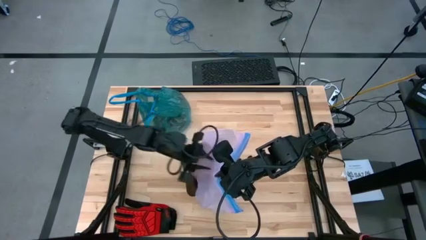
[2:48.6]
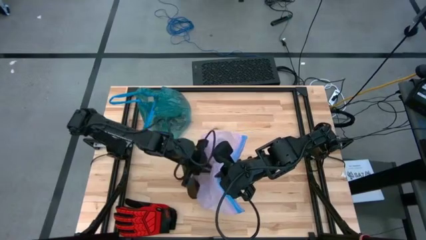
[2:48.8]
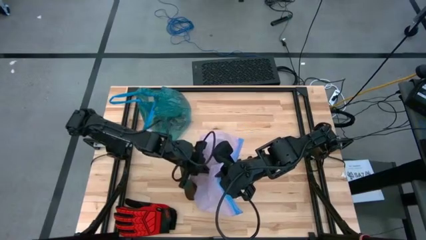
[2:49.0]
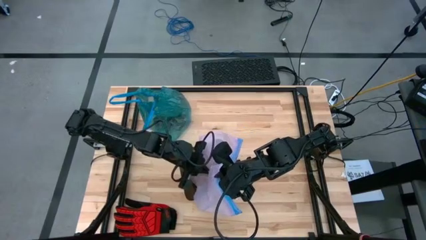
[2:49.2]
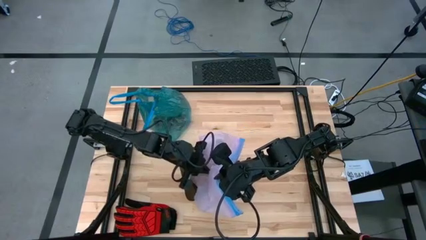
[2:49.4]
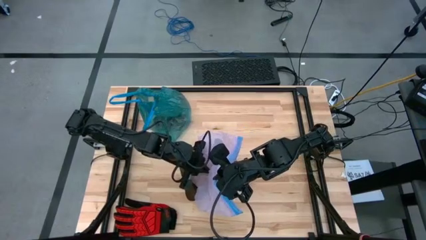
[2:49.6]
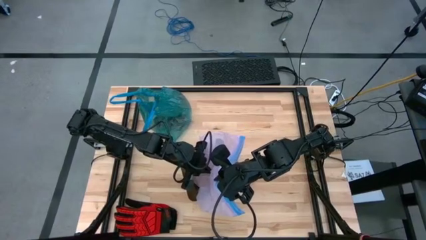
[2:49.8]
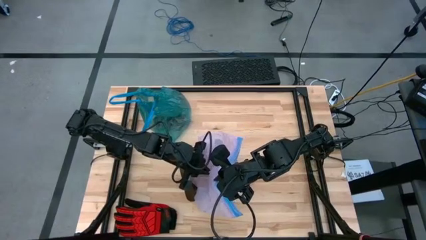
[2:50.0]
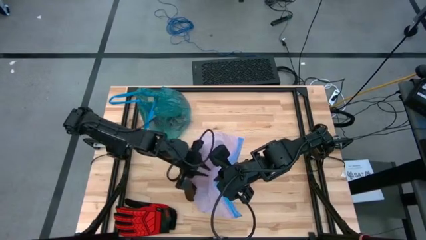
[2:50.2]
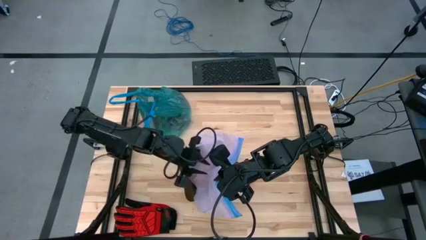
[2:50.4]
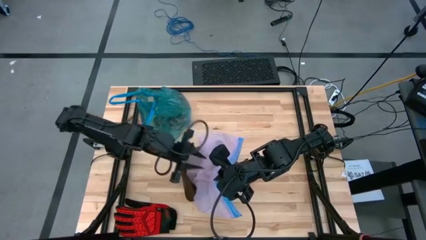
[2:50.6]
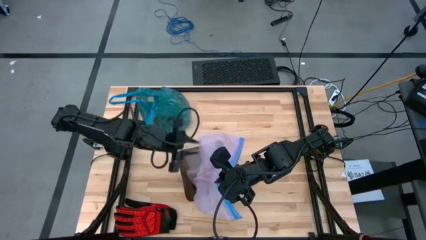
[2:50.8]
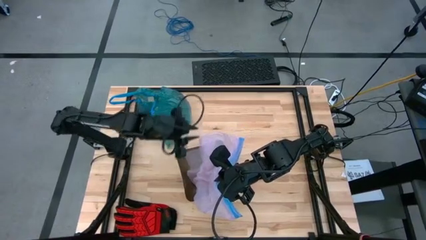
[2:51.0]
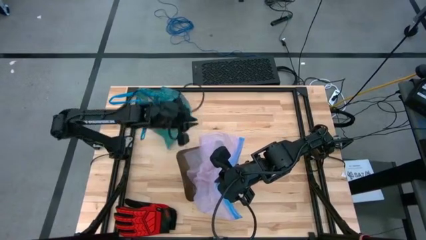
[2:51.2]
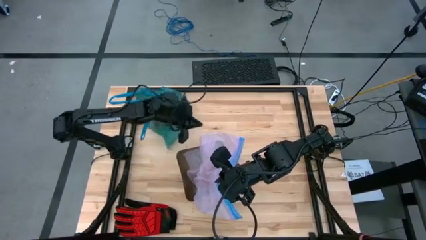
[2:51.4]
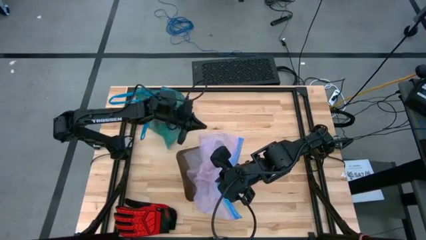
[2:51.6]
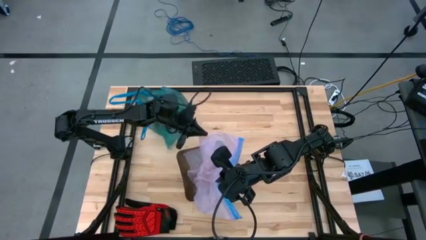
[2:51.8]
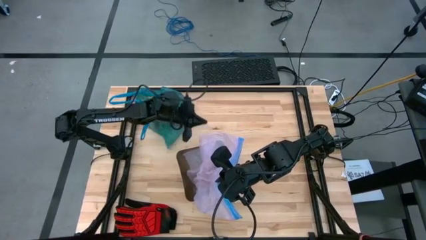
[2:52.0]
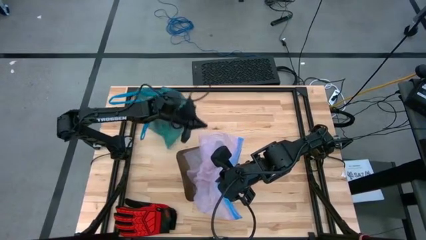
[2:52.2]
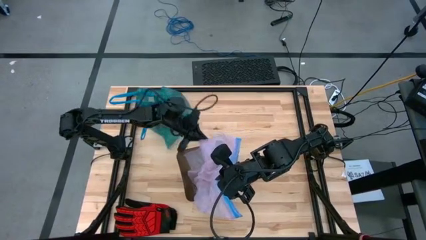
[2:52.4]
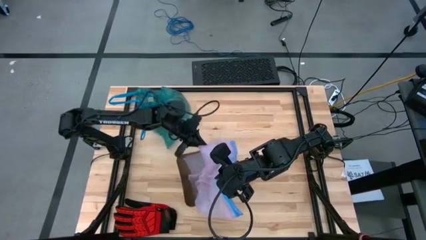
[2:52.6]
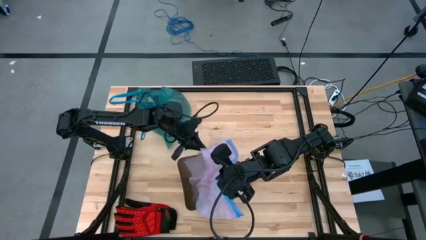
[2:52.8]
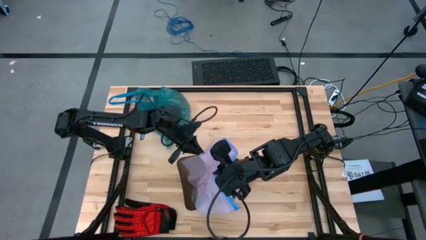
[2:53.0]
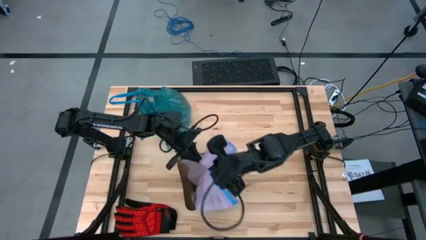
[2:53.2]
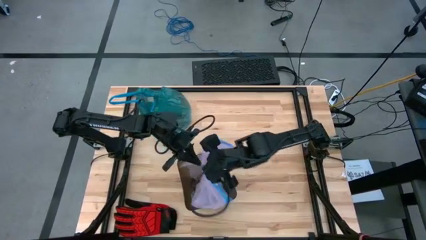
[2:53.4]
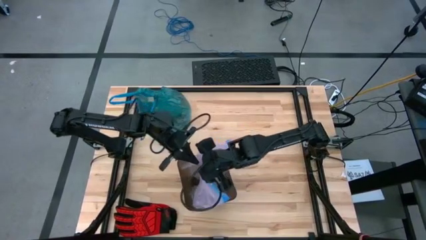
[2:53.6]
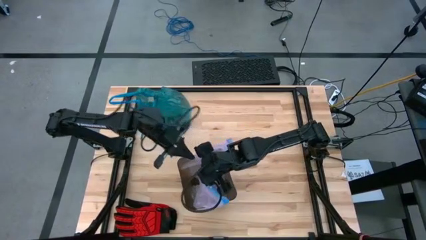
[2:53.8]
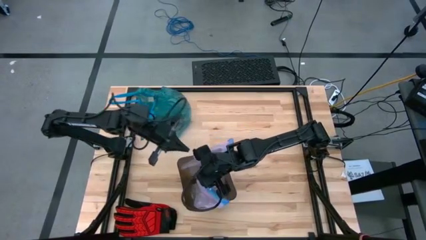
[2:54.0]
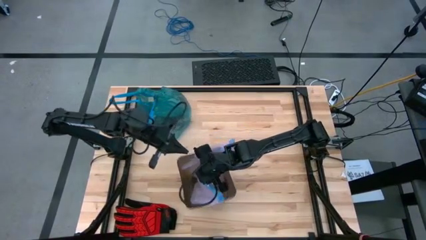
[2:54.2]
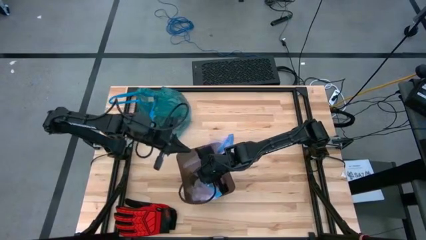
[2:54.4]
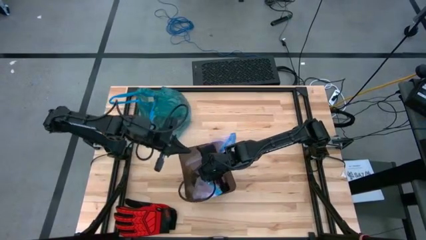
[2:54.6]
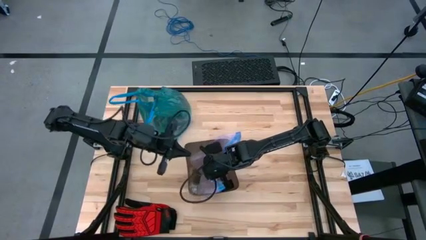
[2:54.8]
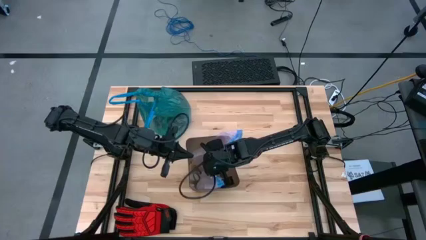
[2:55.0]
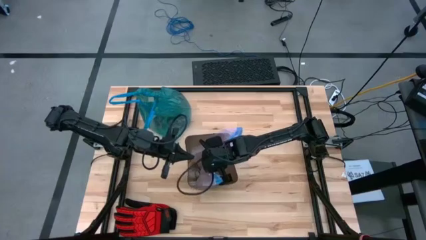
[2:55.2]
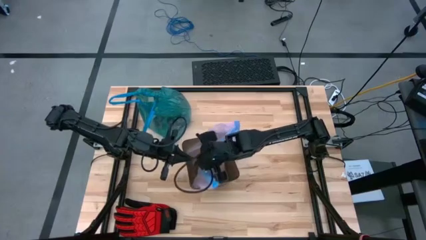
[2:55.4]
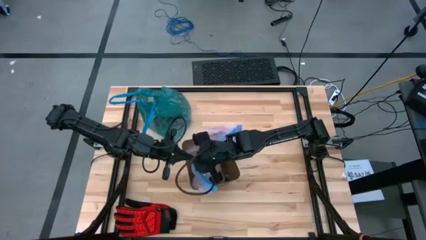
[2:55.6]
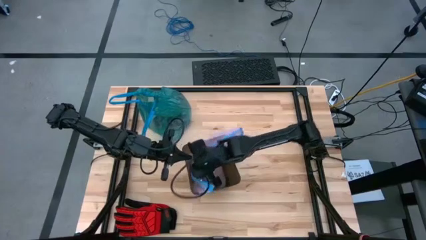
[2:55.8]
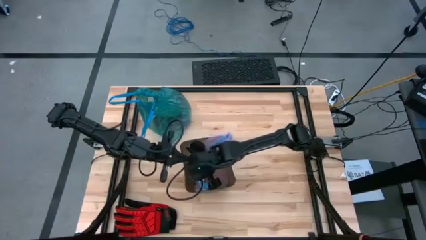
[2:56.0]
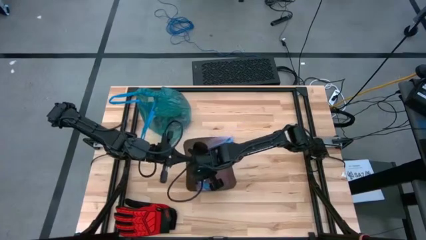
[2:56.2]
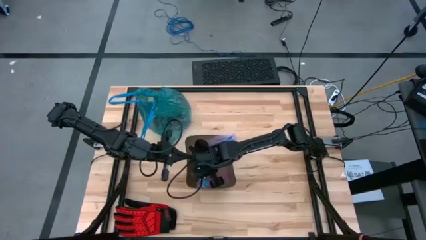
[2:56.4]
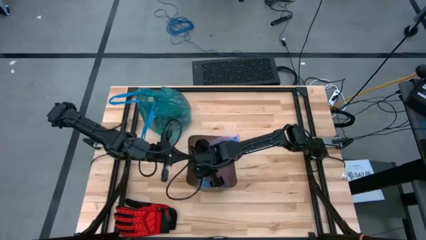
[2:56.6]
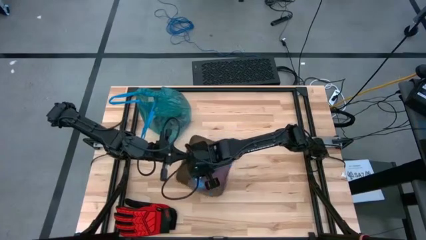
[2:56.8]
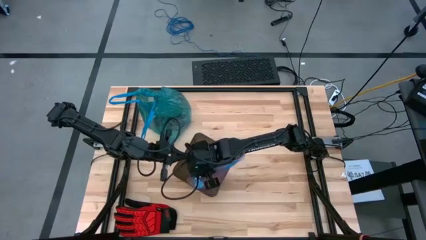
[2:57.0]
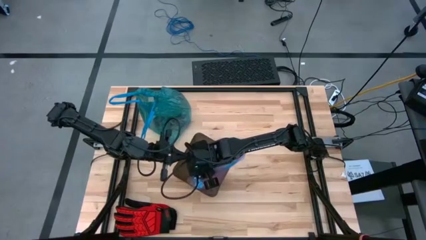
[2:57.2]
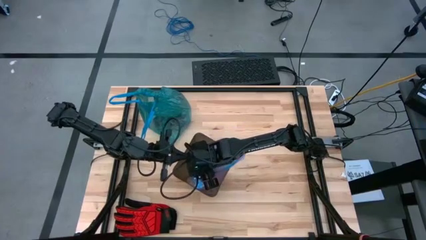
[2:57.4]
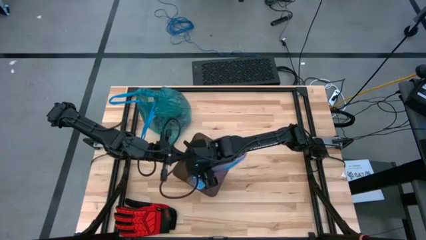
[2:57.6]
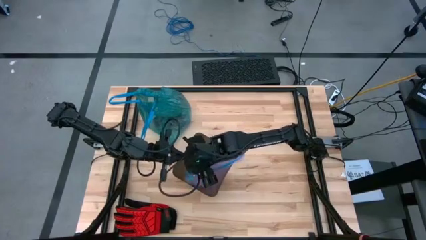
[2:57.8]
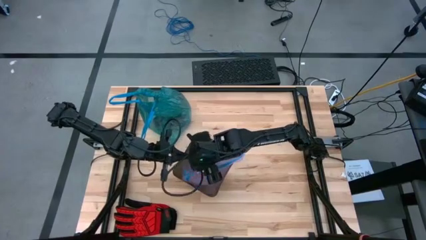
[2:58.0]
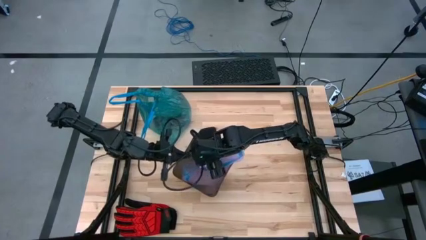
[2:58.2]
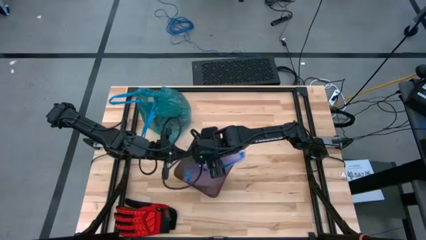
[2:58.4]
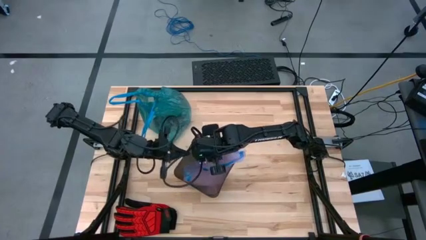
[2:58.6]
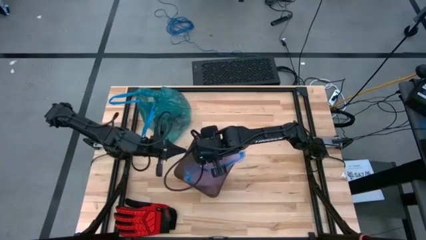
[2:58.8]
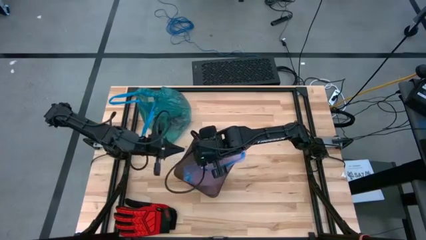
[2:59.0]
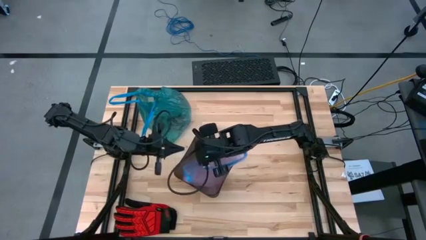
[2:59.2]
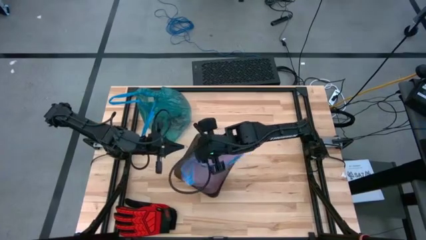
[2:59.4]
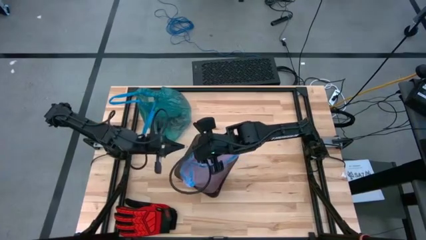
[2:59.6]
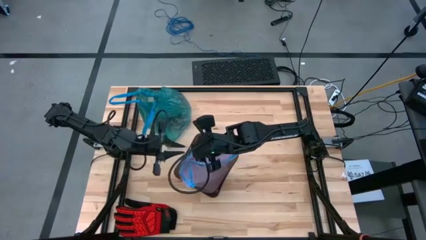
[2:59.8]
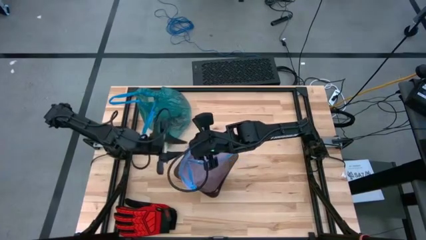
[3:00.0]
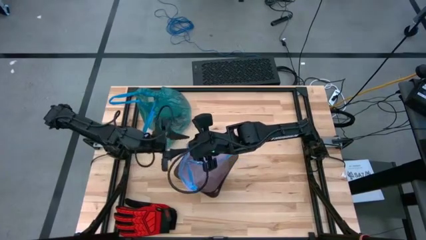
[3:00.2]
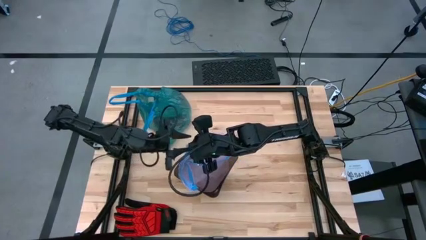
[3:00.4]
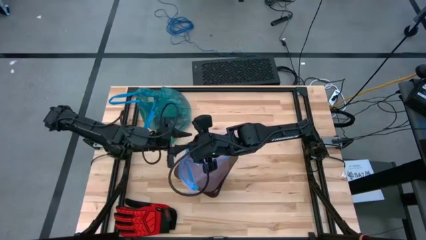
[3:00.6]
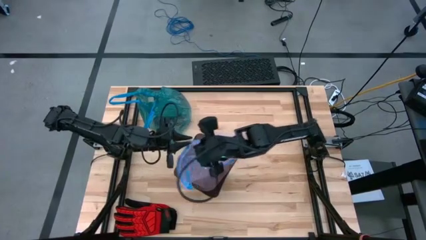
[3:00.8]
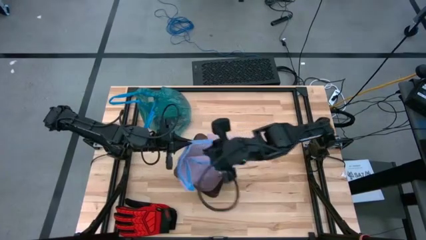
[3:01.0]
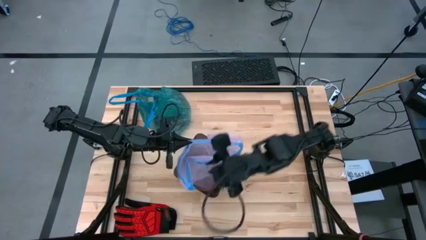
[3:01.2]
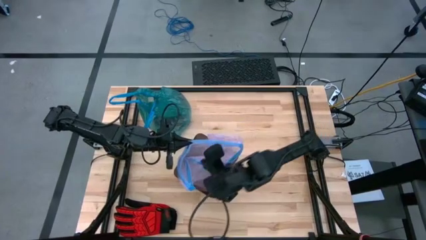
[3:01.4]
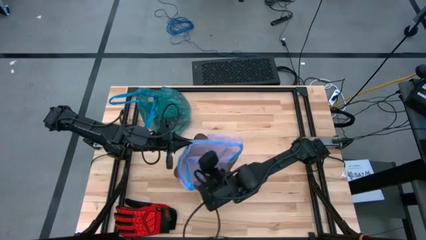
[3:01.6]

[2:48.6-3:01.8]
Task: place trash/remove bag and relplace
Insert the trash bag into the trash bin

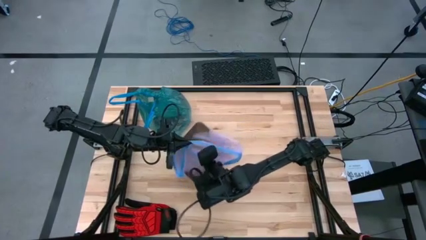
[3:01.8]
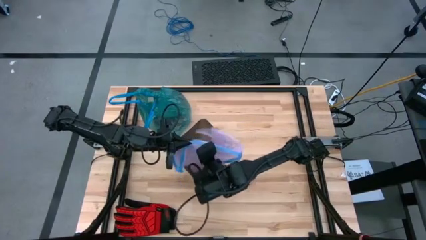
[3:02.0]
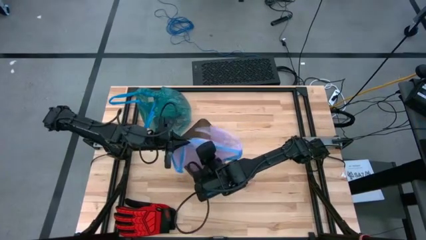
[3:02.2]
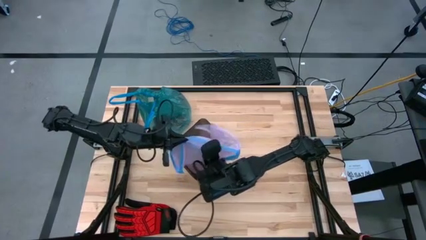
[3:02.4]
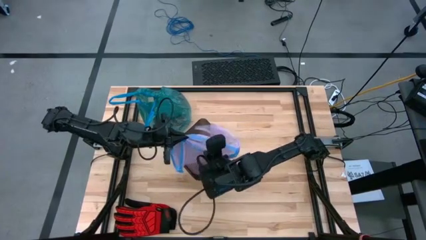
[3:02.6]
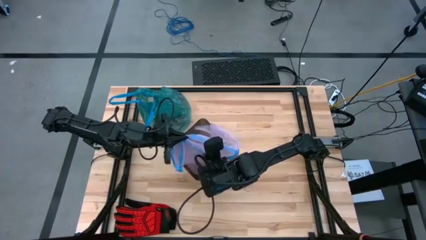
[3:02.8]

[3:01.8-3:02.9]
Insert the trash bag into the trash bin

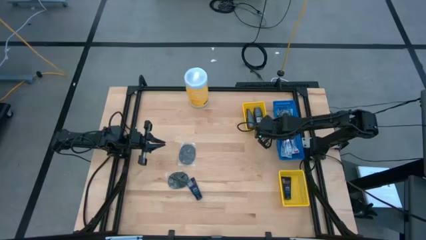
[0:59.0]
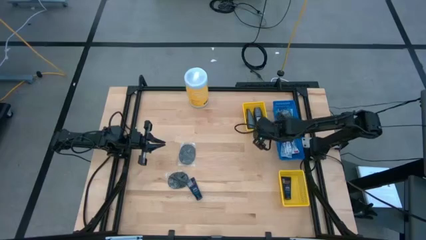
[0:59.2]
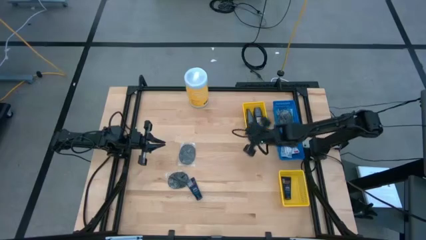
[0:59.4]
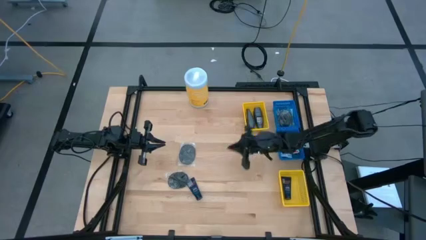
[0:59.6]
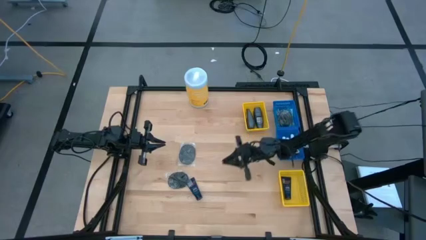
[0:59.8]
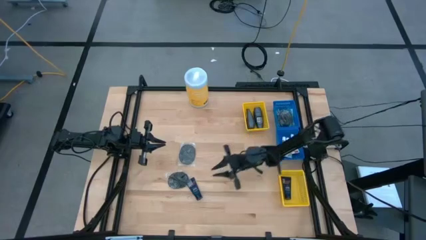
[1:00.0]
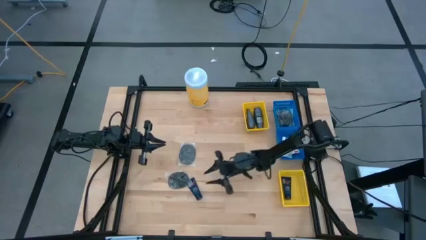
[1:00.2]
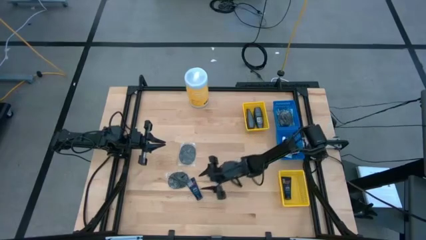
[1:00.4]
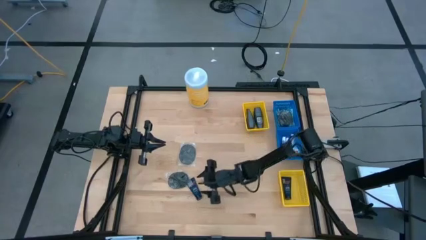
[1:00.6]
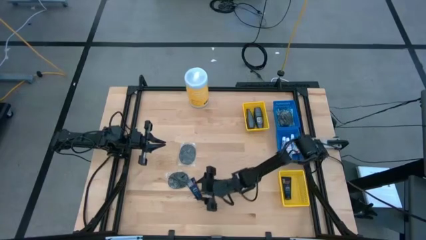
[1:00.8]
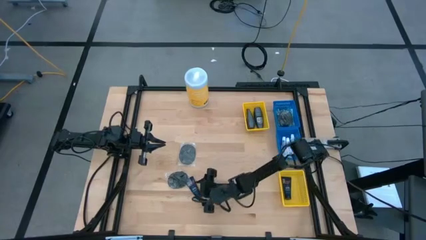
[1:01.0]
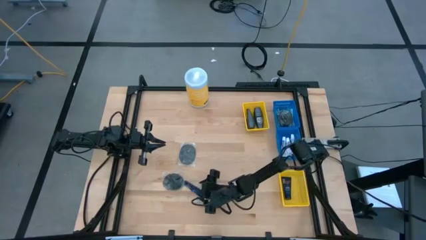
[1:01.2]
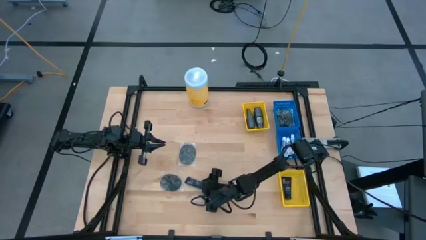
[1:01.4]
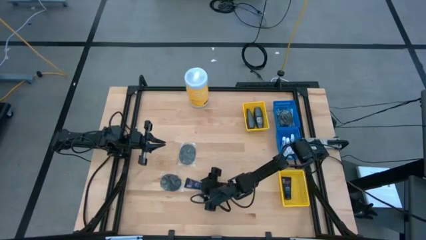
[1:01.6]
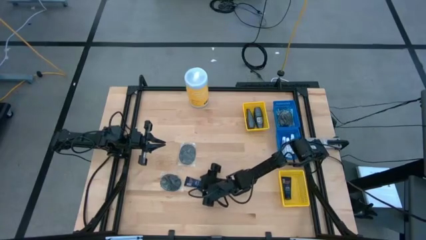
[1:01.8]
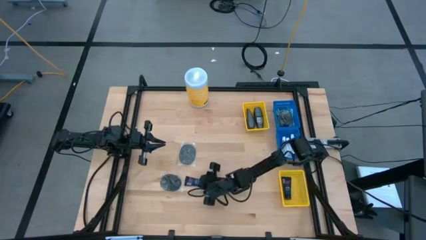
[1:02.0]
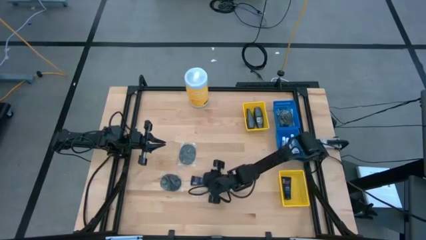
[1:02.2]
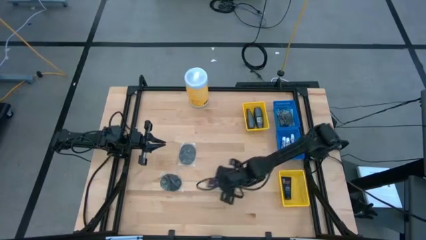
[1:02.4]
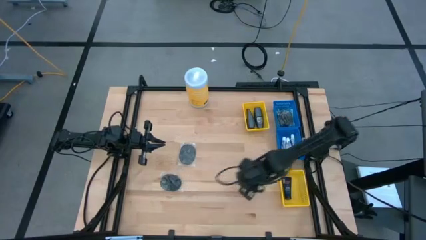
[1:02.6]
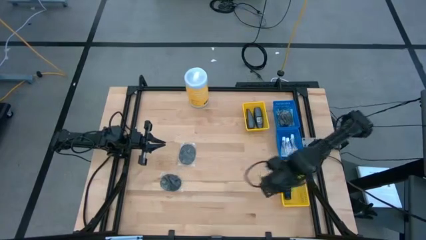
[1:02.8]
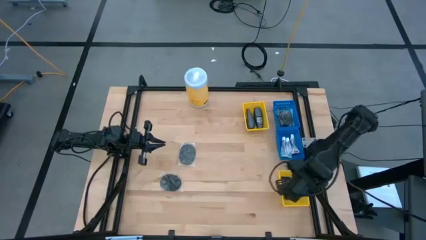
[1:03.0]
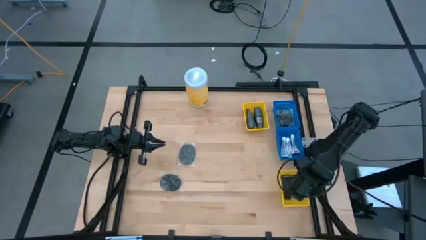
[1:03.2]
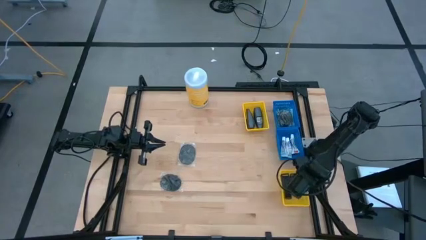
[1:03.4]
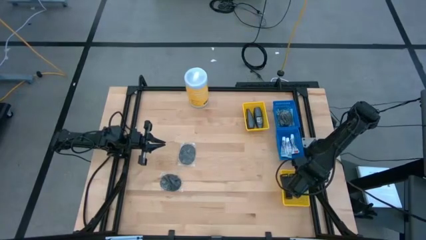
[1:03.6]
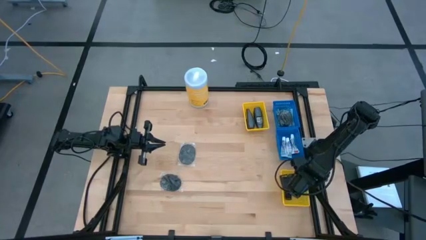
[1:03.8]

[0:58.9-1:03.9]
Task: Pick & Place Travel size toiletries
Put the blue shave cream into the bottom yellow basket
